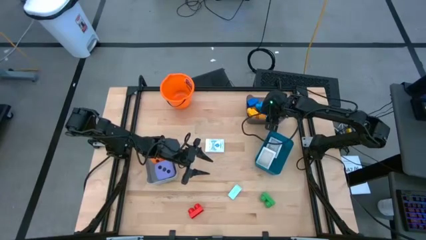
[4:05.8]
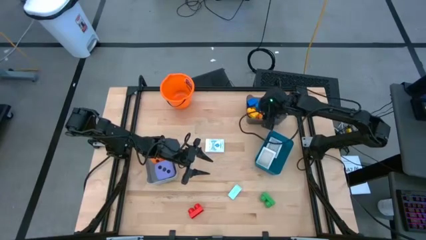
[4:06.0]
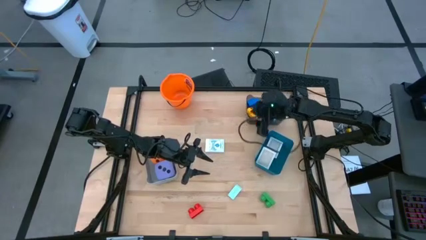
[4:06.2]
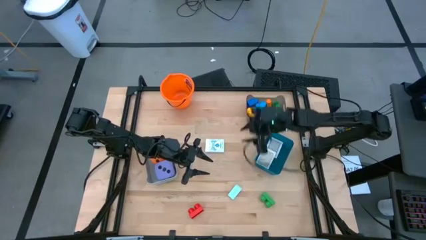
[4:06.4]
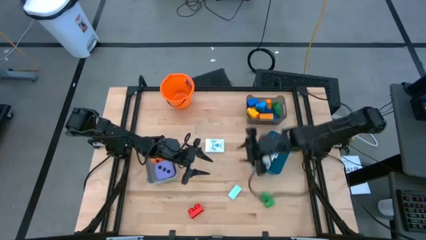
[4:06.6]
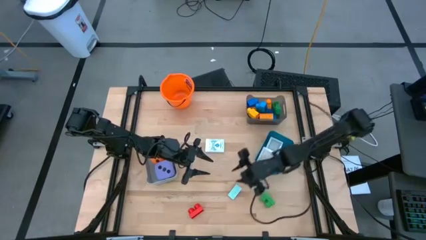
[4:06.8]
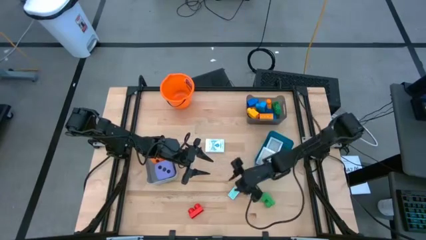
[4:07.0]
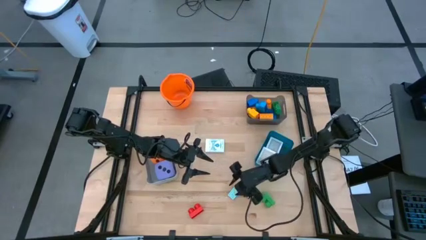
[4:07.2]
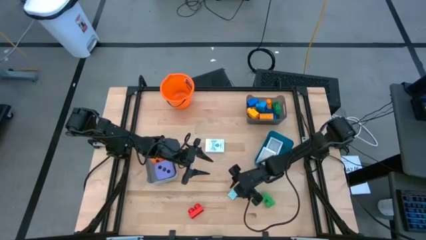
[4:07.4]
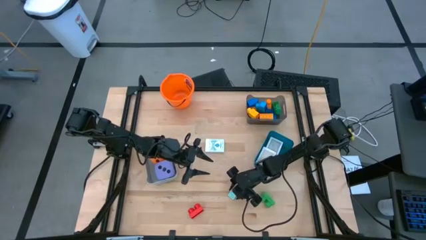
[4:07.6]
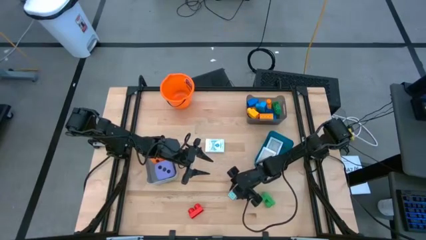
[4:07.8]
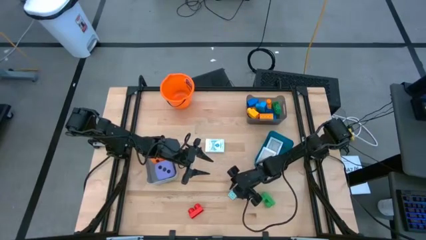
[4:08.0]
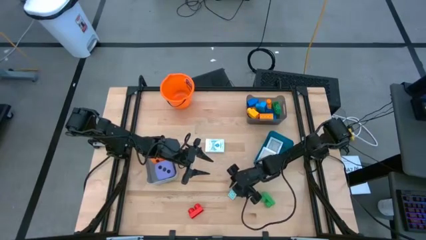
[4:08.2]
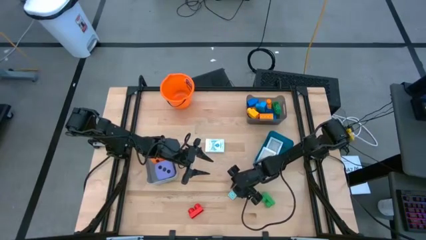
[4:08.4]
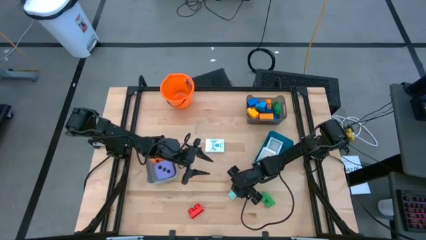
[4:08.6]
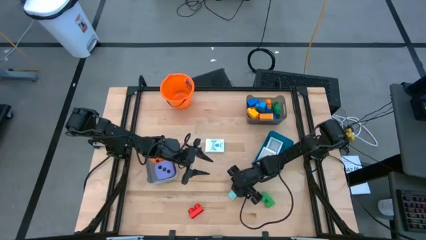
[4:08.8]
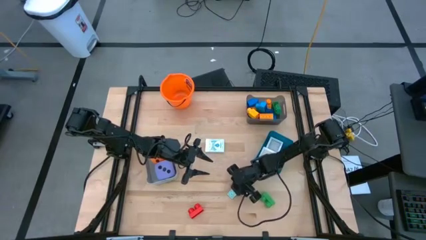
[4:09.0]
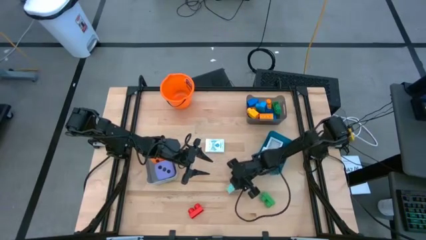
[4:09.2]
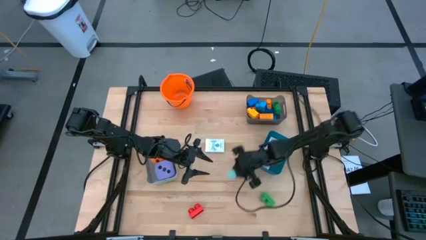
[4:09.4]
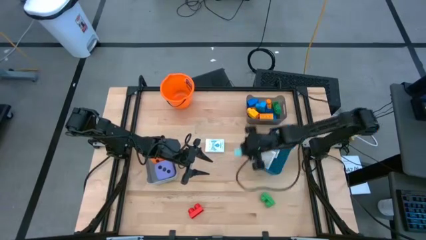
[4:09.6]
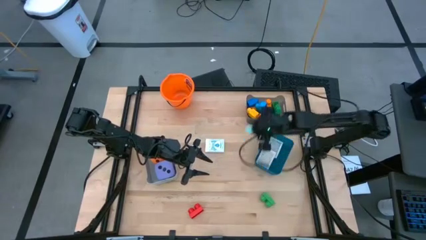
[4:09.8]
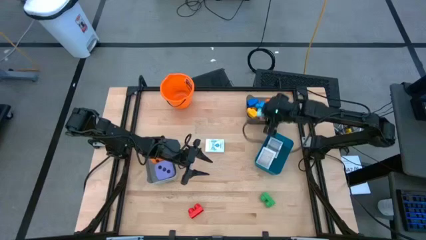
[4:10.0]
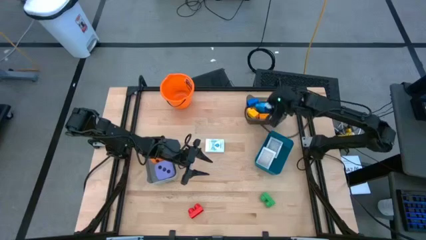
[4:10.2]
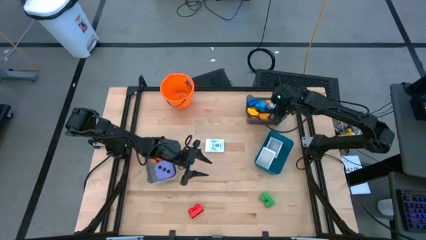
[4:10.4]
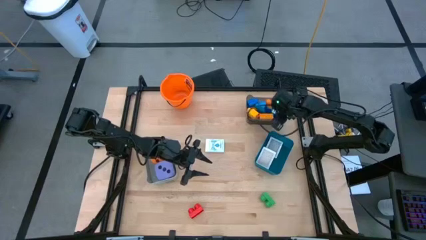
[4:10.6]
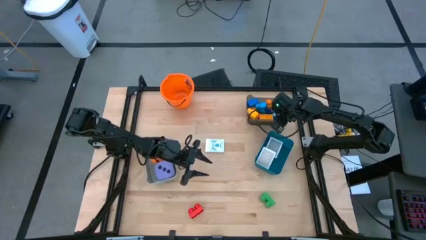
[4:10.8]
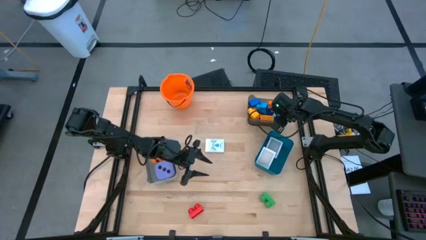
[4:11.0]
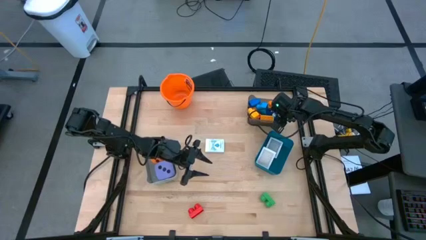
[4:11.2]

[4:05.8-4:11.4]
Task: Pick & Place Toys
Put the light blue game piece into the black bin

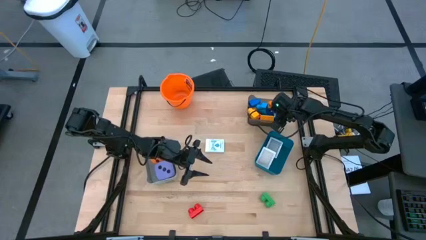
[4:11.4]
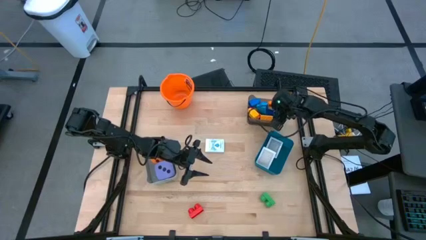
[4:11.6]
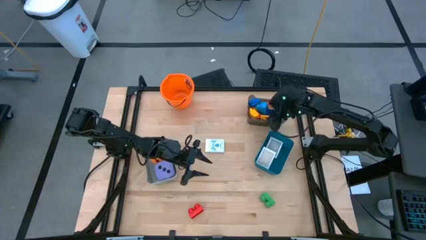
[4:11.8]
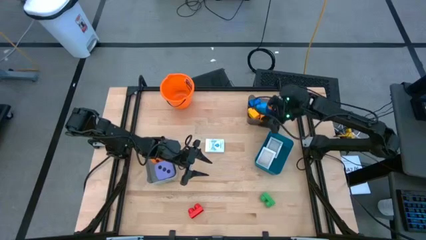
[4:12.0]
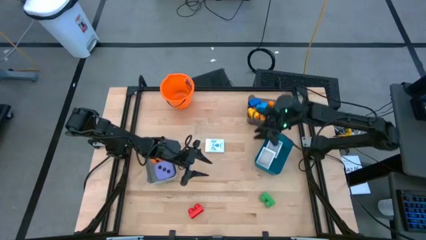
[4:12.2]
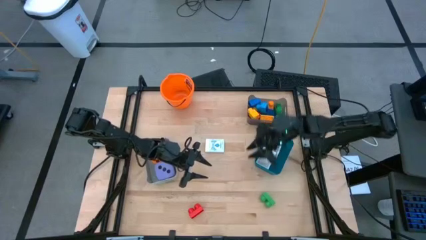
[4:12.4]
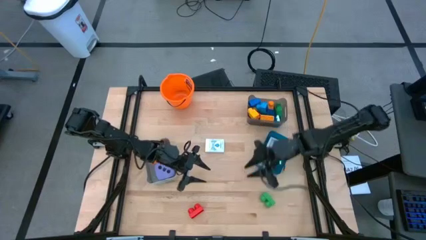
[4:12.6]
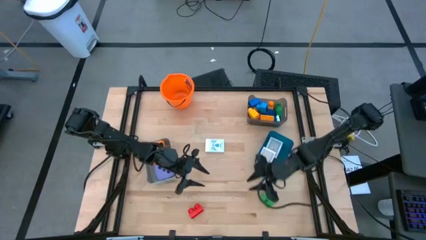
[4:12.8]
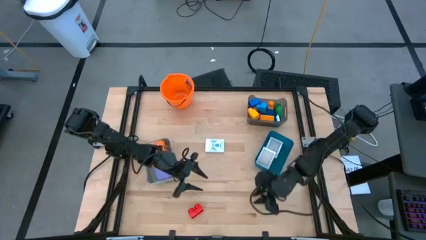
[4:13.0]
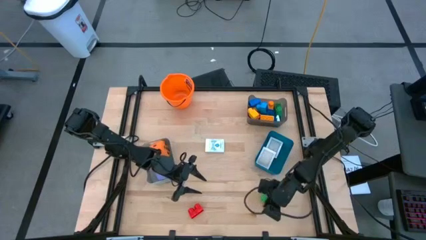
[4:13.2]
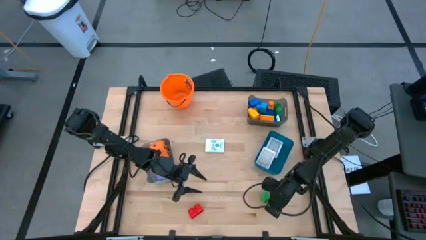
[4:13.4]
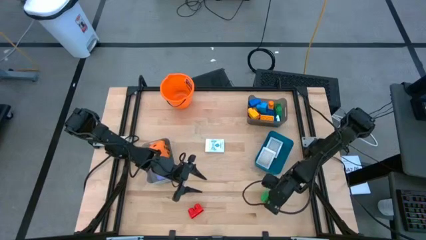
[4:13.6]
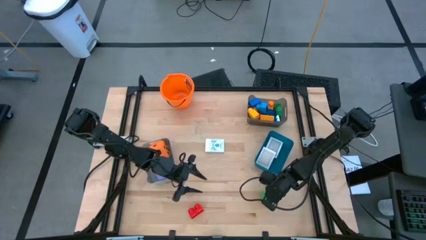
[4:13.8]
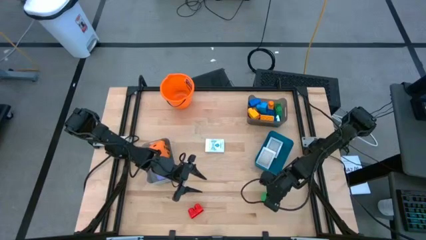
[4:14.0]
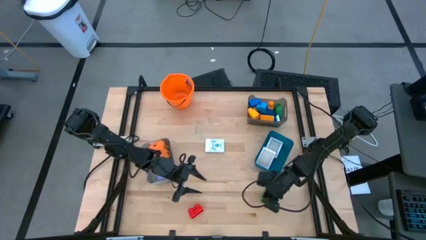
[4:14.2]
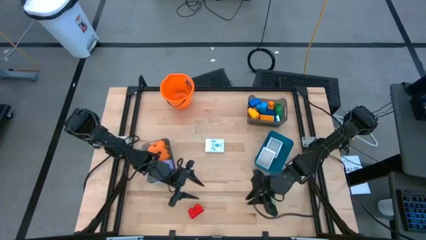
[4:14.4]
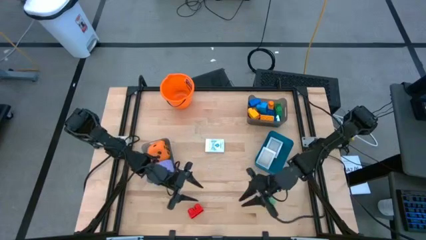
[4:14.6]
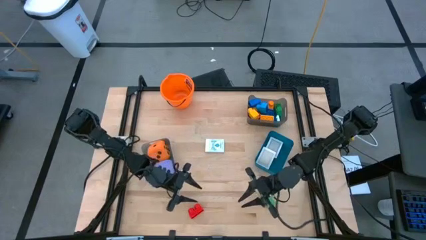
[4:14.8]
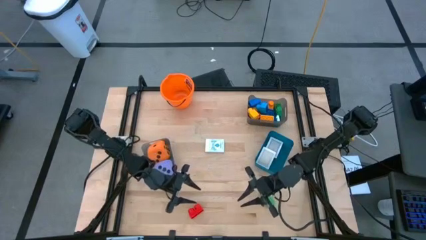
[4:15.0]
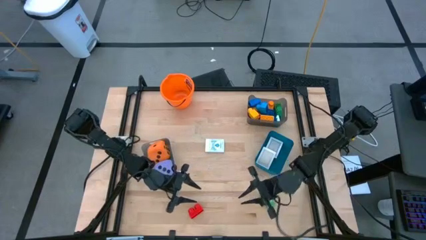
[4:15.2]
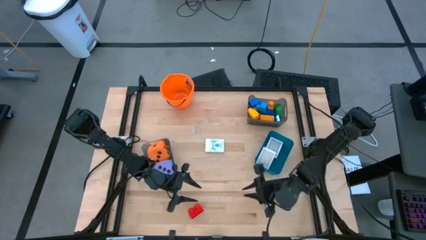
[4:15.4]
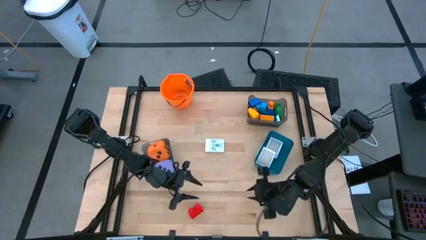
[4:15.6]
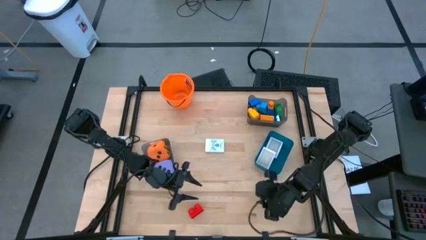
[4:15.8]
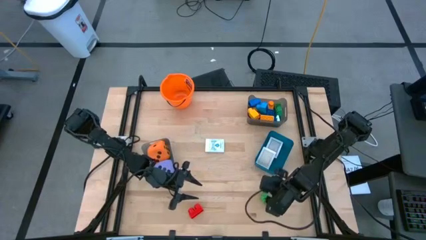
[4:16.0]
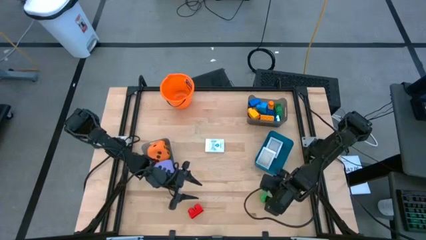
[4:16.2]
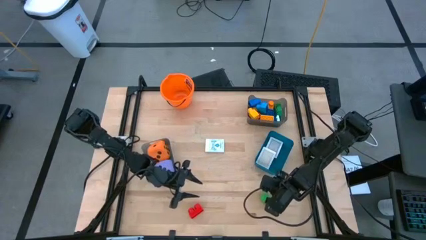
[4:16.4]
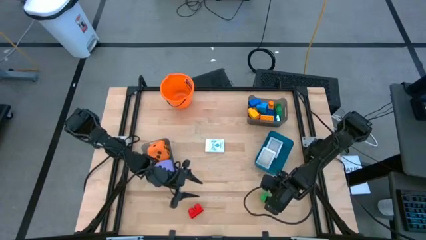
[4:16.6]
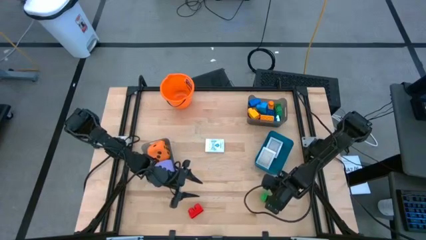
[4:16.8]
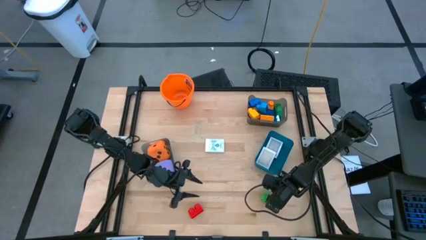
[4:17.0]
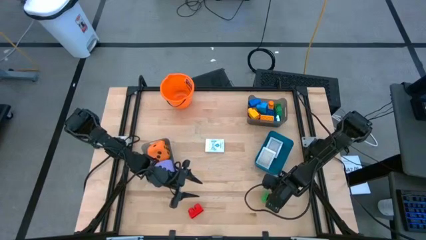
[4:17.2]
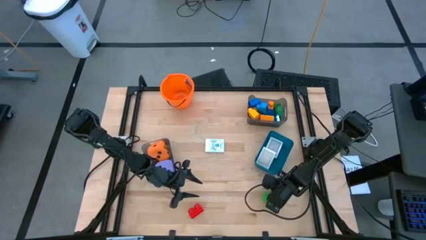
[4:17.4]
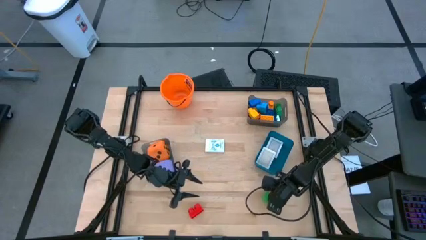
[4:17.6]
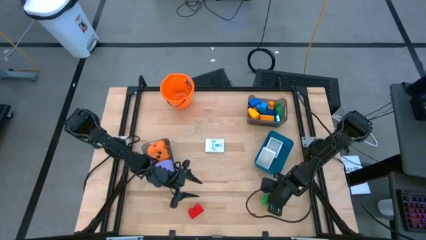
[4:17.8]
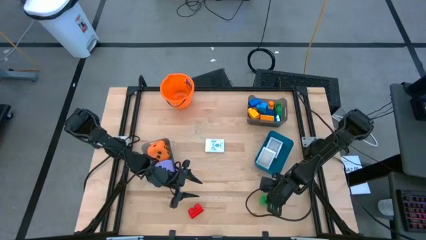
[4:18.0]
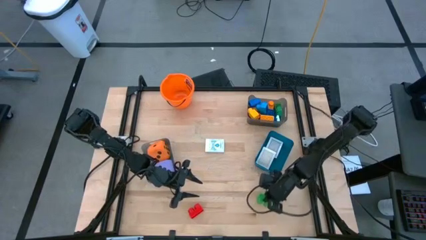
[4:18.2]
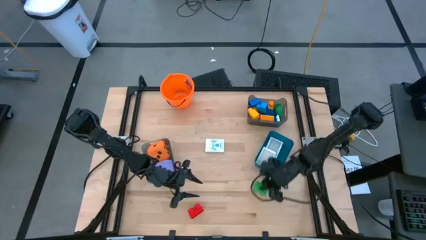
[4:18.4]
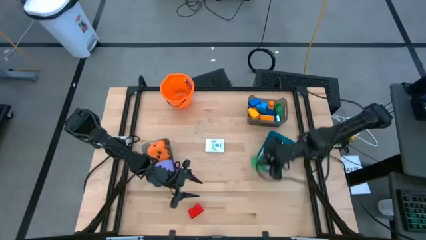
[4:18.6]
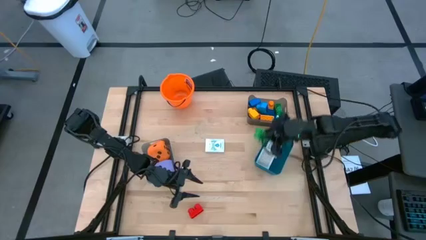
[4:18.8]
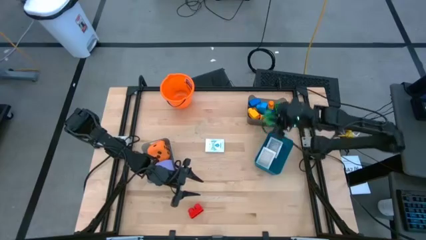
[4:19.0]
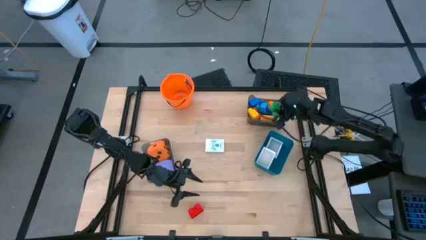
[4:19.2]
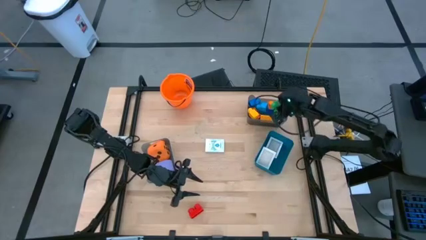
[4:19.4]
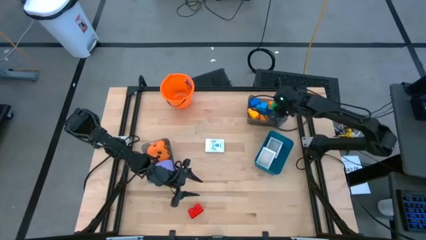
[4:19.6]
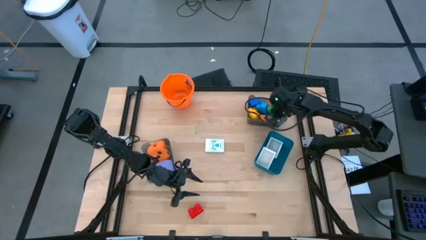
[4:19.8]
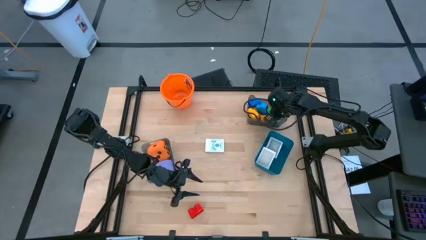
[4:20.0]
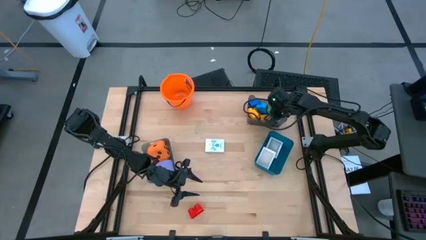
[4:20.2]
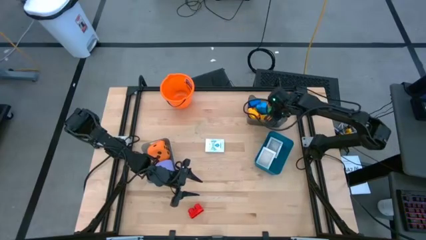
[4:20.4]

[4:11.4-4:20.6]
Put the green game piece into the black bin
